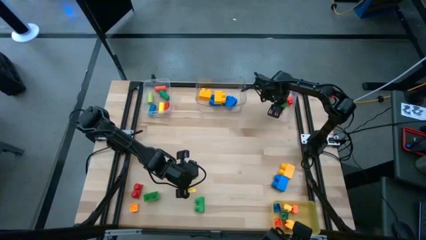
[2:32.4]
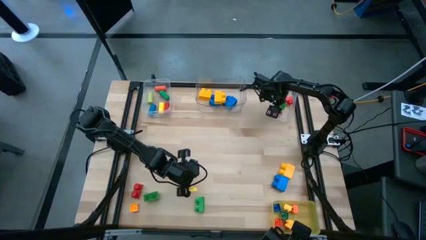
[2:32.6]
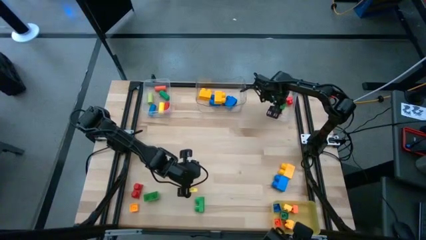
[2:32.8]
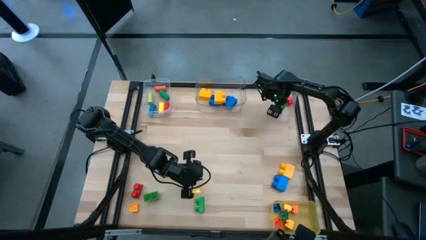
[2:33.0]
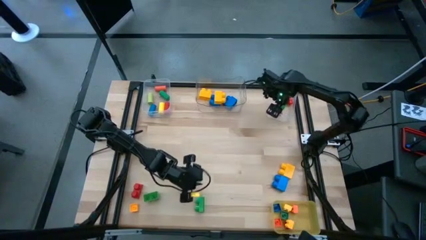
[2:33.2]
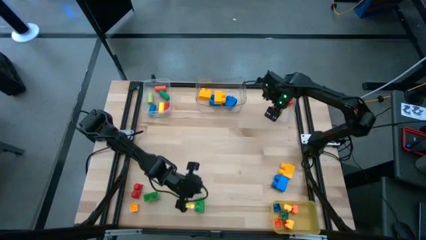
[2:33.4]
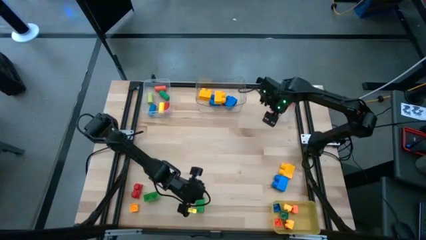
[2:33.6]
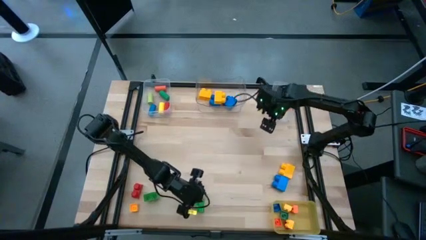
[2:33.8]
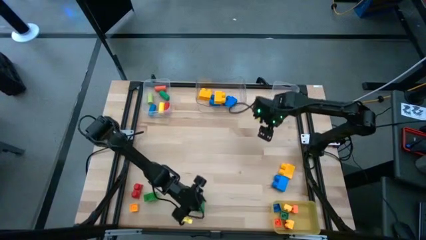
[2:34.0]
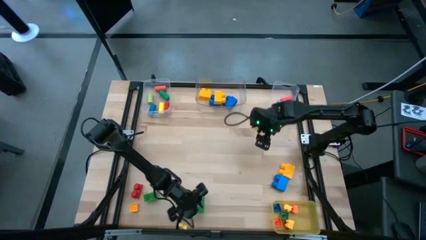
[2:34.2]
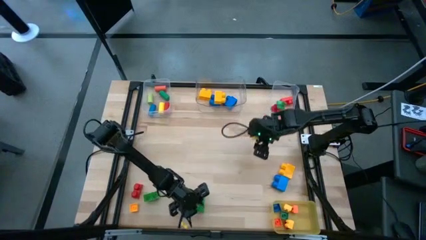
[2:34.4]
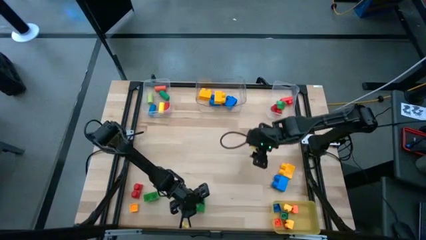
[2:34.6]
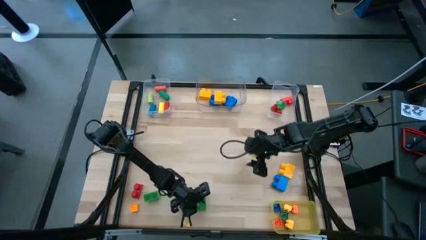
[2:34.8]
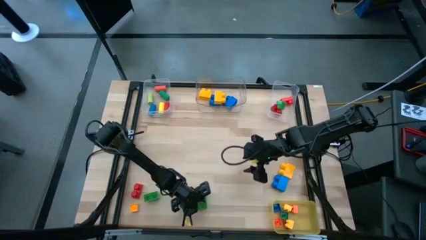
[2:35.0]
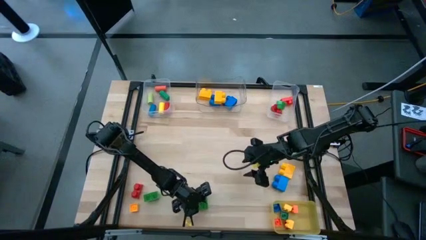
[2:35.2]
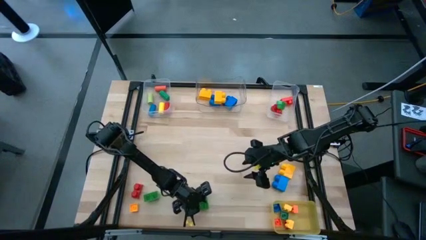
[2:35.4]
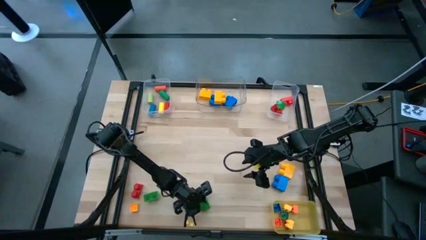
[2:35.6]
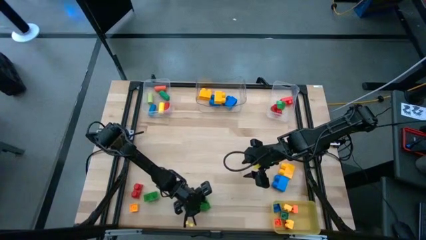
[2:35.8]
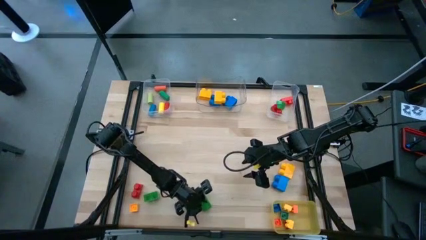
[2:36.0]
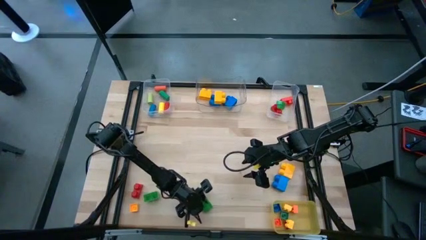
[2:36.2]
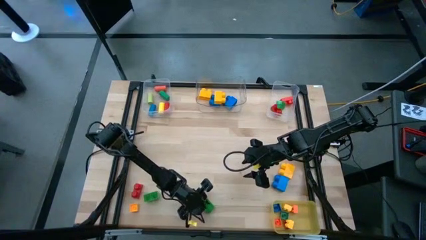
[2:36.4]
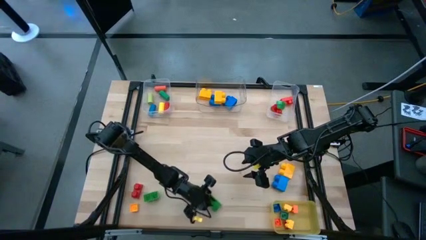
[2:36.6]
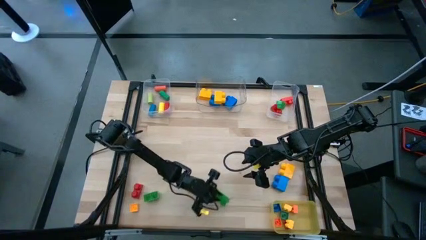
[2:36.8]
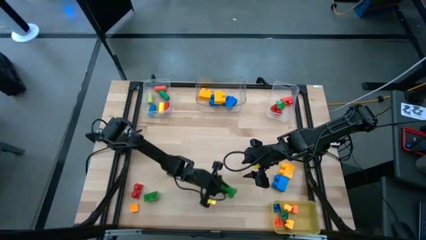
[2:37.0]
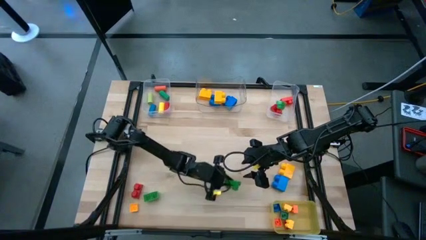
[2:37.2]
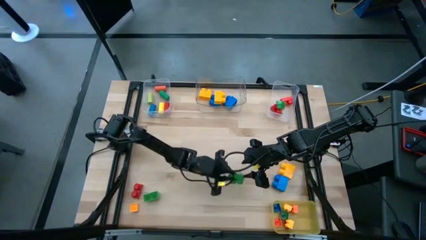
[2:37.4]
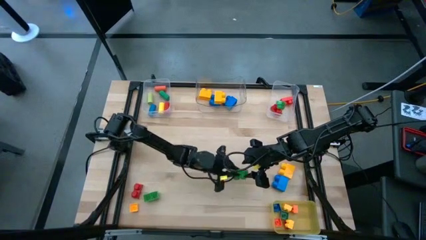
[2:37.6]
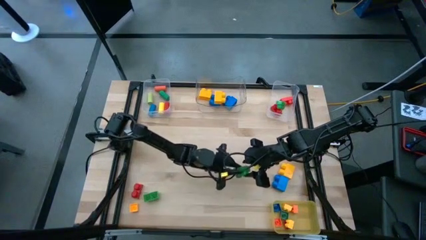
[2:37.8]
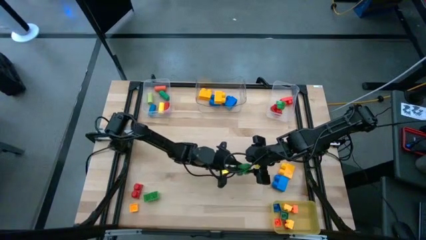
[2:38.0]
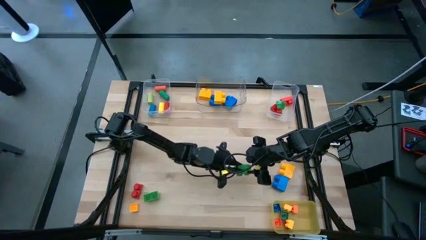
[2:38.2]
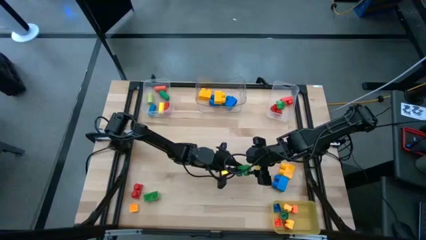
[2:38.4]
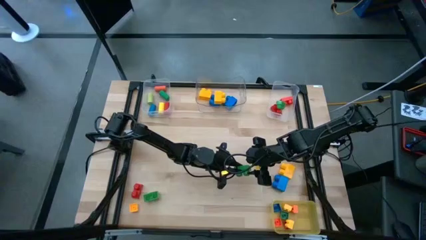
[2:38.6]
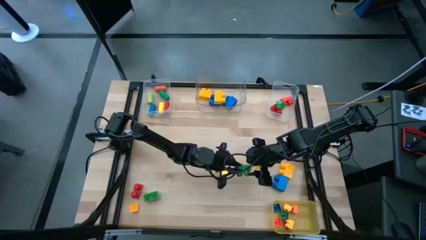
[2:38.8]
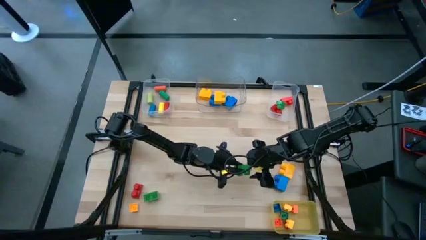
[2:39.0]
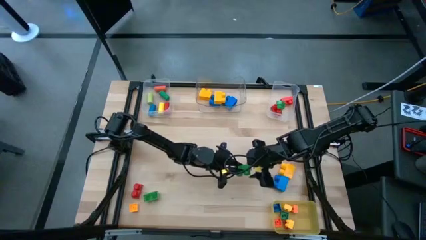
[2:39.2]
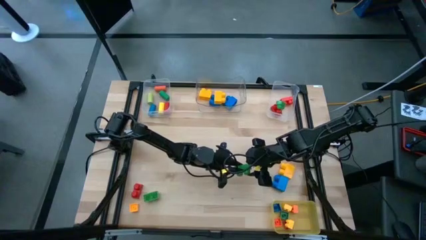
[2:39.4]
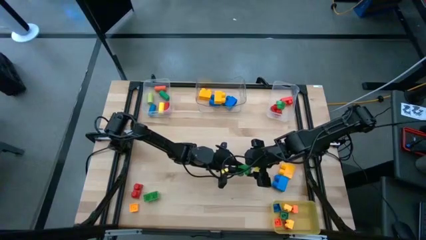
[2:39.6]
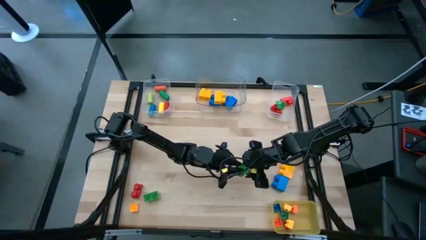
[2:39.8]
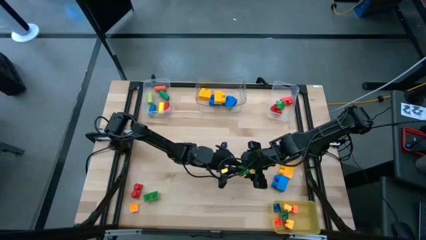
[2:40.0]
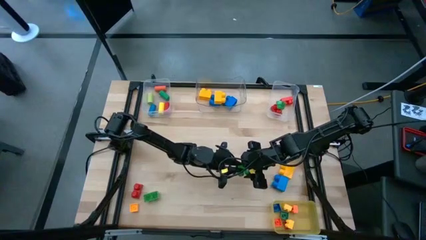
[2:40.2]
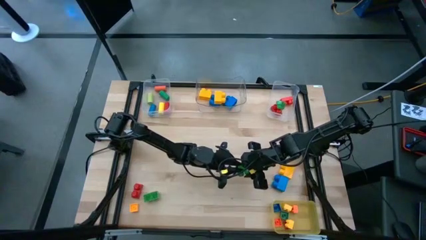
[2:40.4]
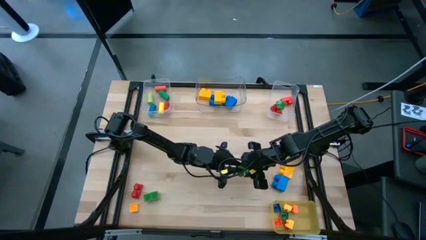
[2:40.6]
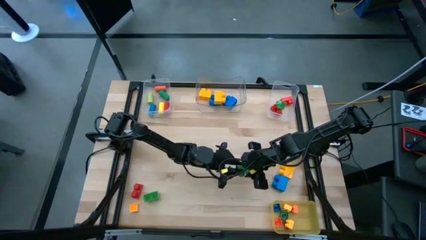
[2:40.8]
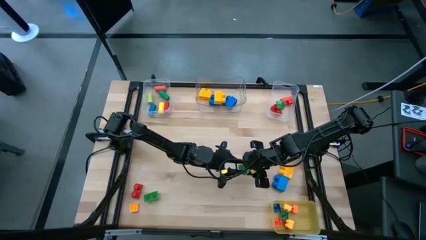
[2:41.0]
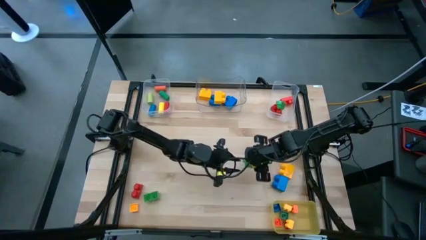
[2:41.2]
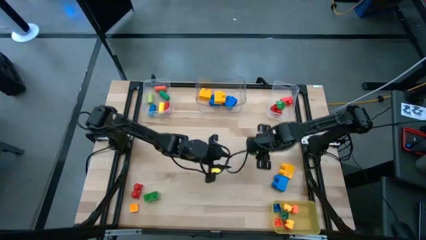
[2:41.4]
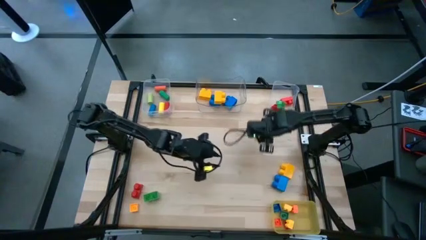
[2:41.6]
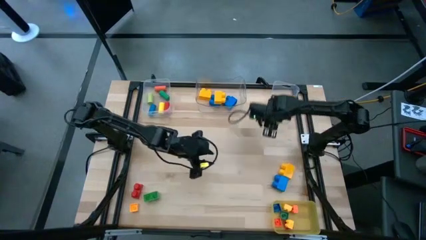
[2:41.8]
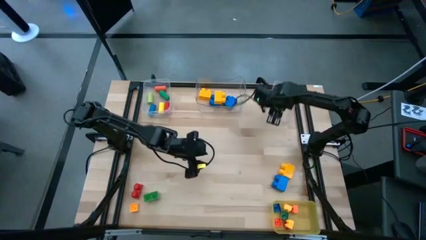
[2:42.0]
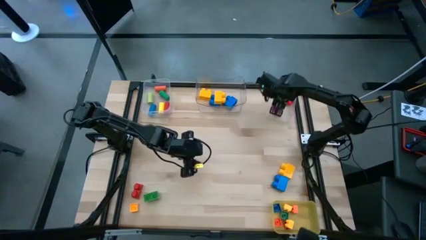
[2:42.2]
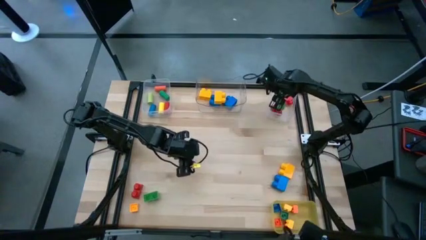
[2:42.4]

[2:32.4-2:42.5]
Task: Sort blocks by size
Put the medium green game piece into the right transparent bin
